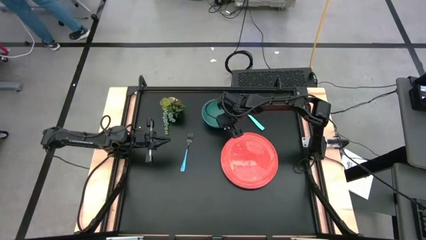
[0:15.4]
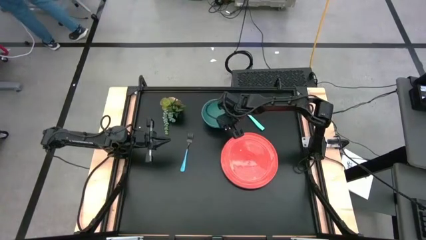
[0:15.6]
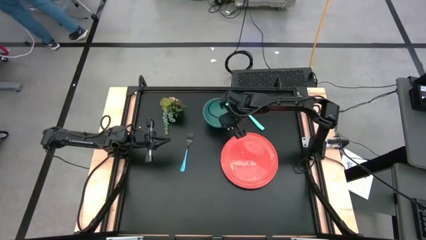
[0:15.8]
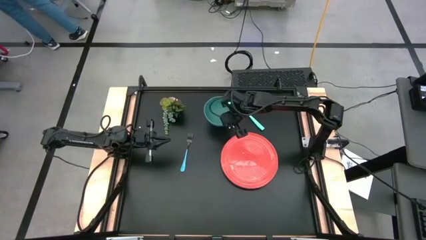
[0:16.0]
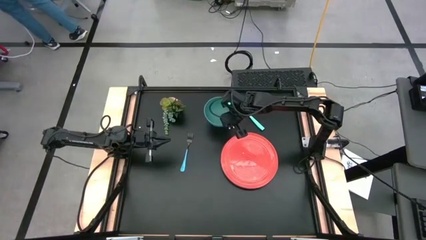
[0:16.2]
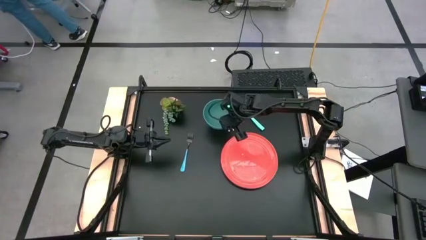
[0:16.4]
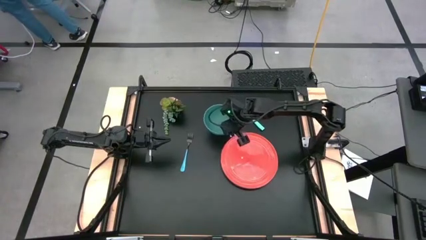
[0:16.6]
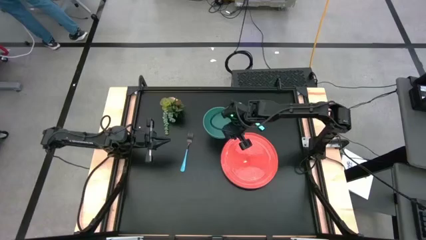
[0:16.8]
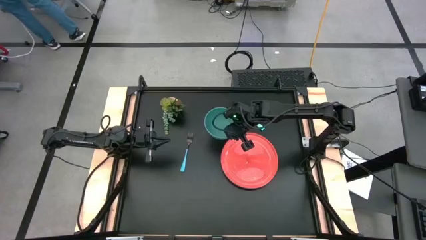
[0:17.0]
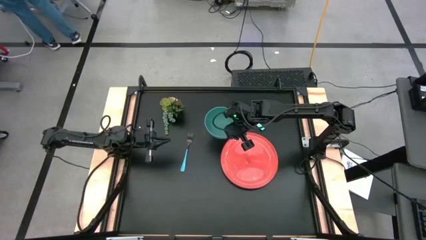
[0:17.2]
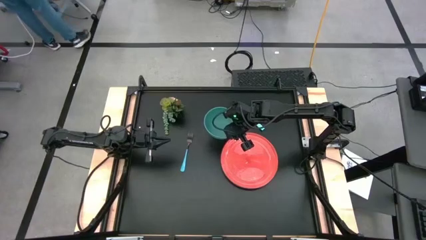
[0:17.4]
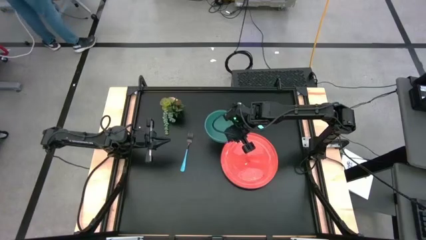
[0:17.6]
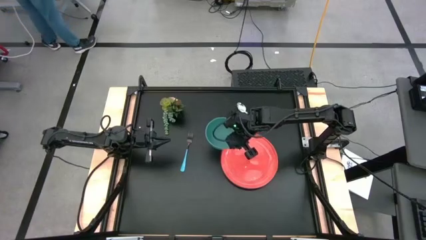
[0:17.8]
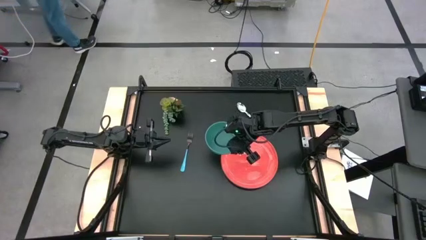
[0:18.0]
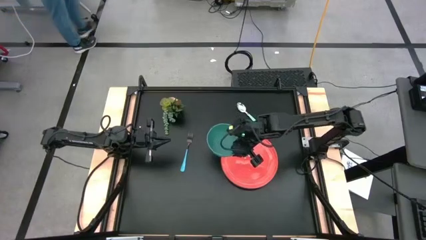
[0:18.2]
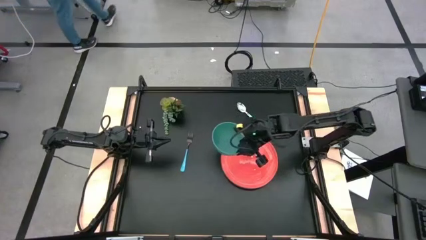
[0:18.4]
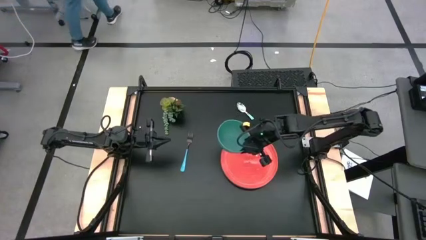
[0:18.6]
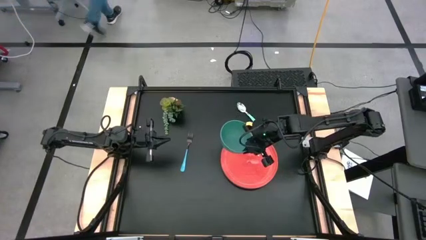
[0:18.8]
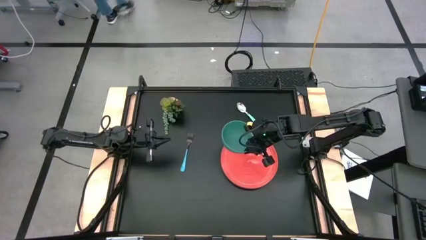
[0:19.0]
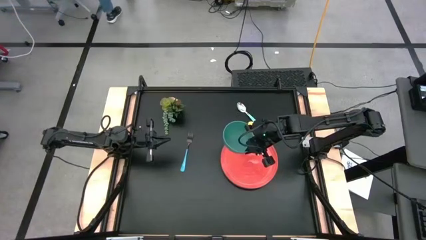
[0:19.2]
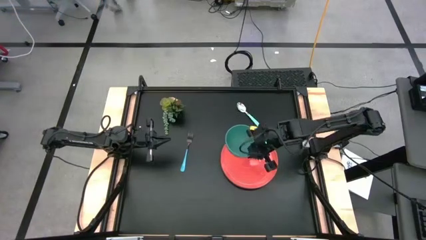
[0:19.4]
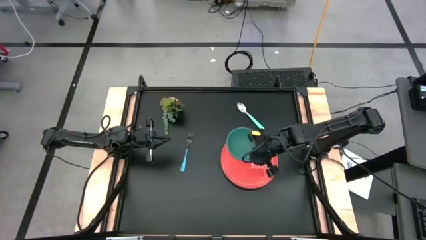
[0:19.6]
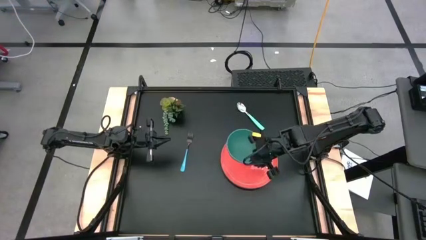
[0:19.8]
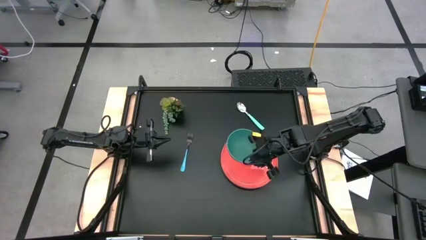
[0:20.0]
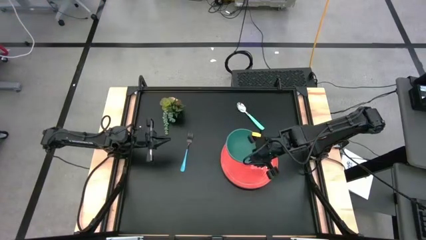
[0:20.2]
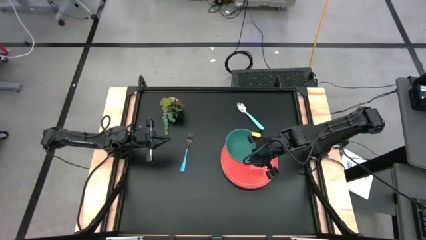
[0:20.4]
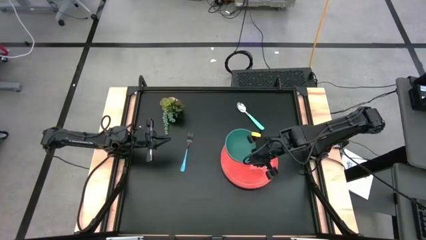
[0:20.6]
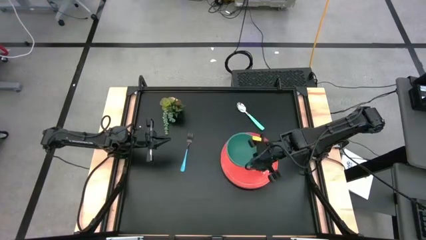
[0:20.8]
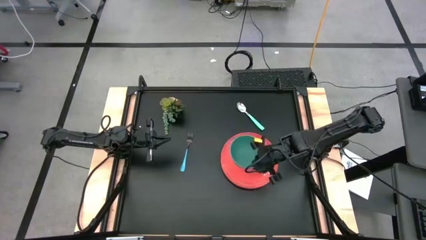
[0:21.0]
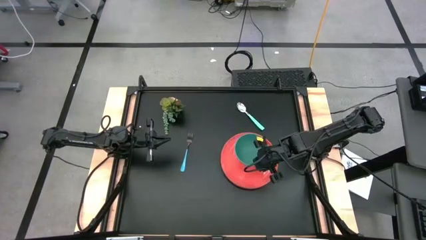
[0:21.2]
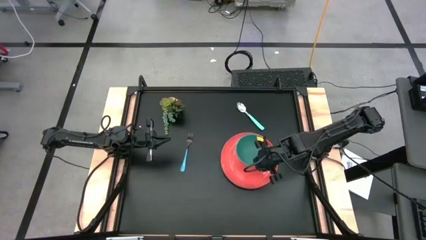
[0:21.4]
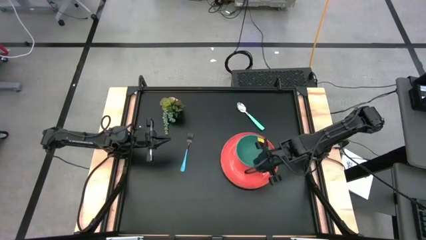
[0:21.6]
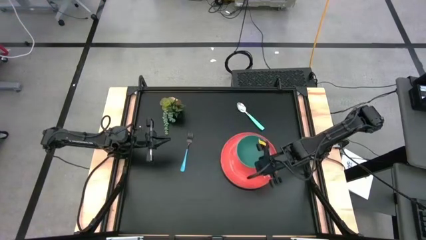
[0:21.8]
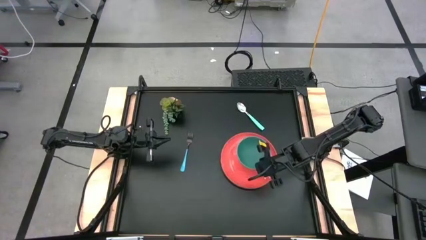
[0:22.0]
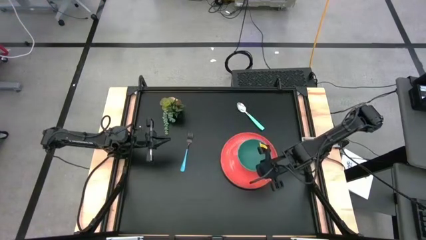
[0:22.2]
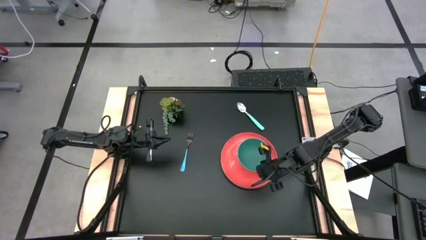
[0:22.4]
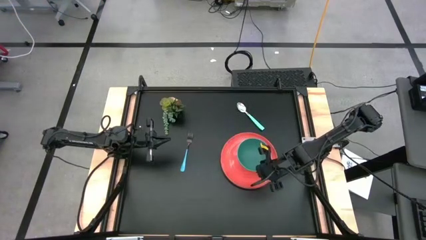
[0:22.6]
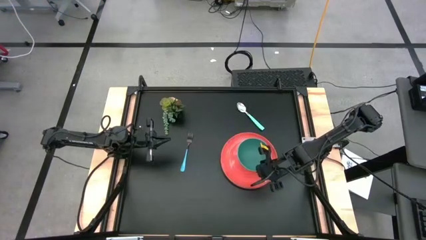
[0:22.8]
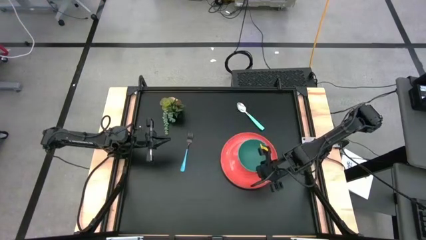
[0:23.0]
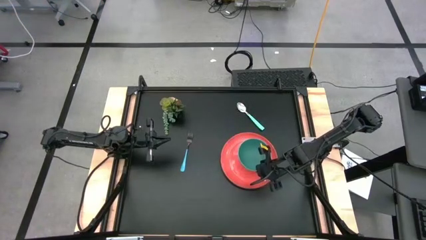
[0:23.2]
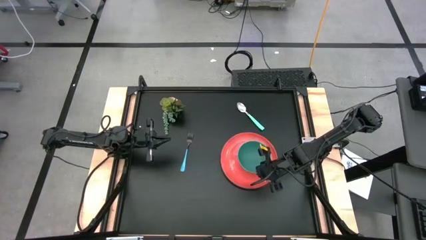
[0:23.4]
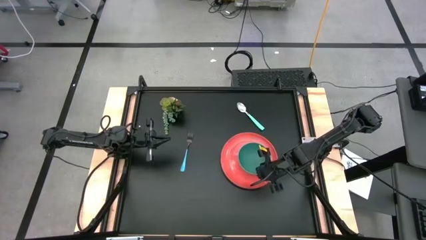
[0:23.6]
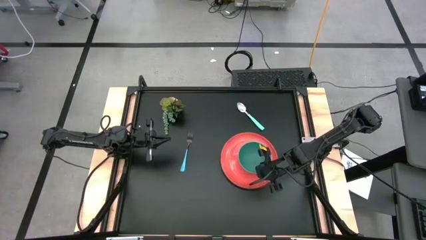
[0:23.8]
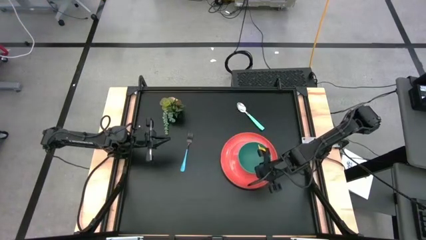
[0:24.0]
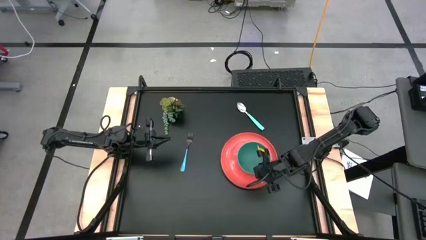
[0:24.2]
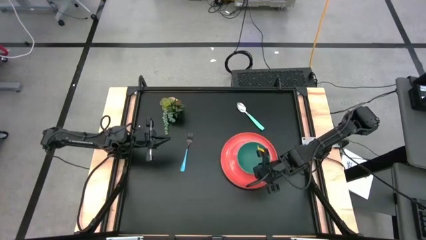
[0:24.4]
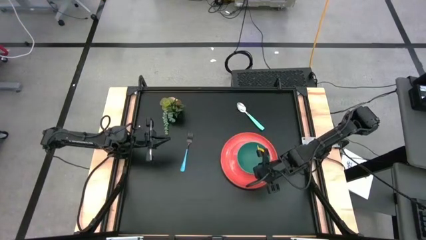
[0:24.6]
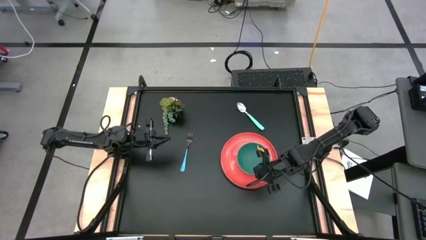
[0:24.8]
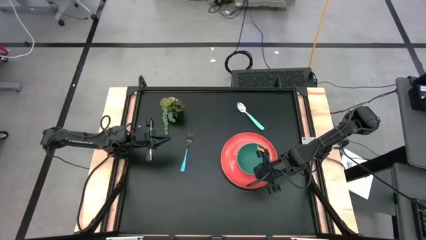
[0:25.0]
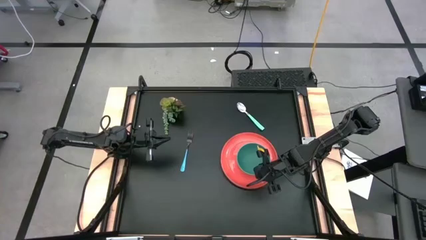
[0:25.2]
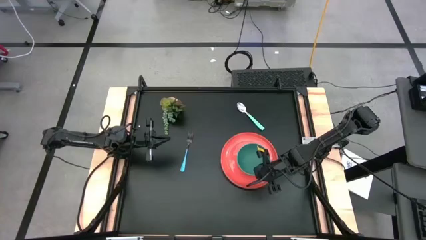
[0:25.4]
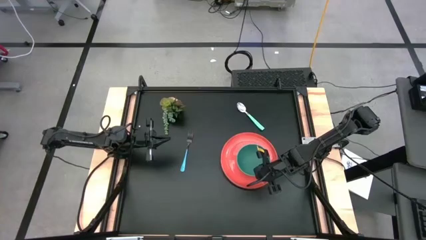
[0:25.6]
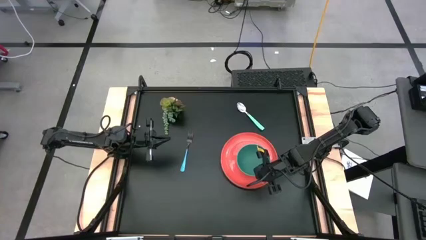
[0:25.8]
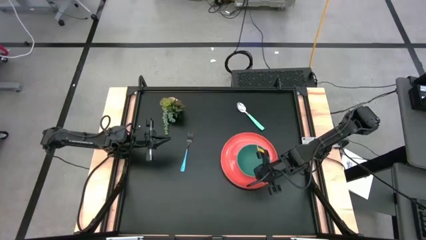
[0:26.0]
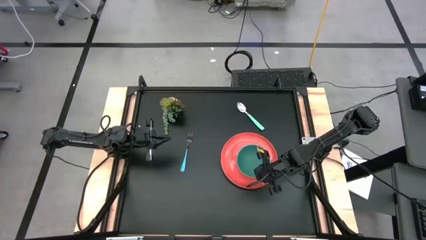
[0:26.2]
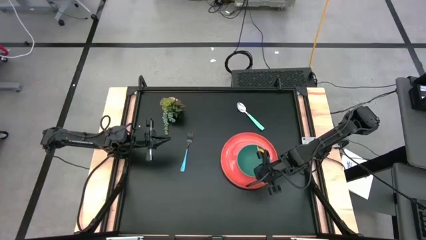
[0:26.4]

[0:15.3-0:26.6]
Task: Set table place
Put the green bowl on the orange plate
